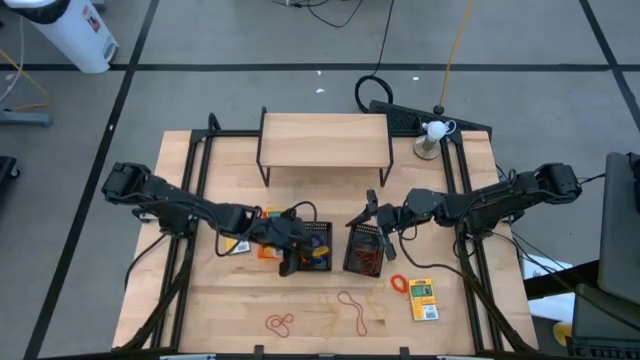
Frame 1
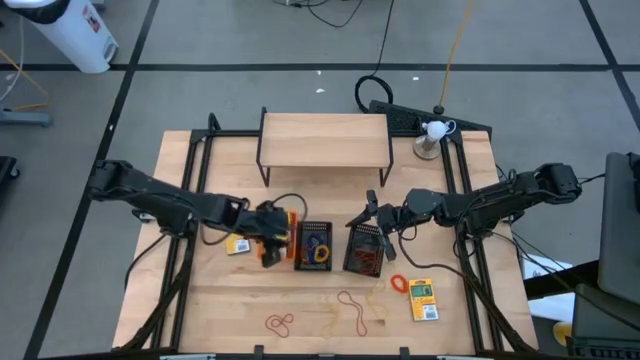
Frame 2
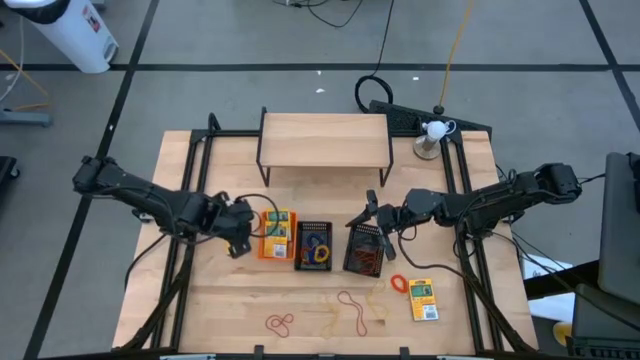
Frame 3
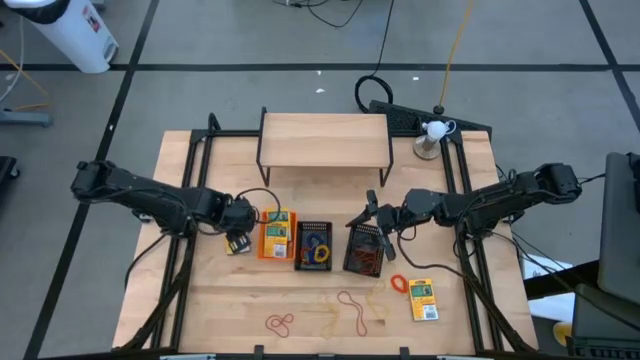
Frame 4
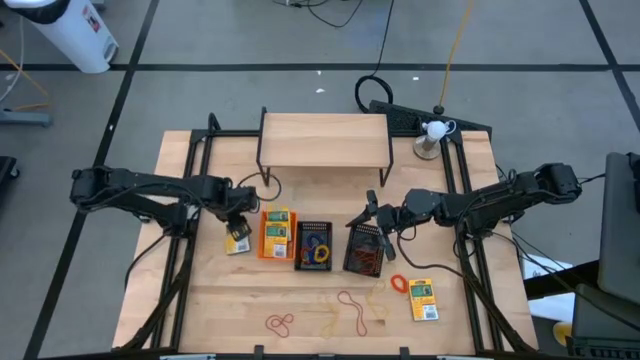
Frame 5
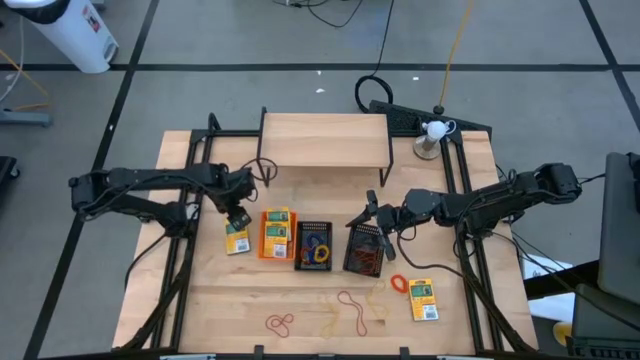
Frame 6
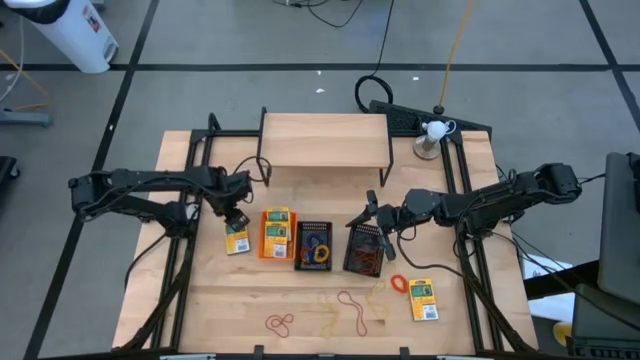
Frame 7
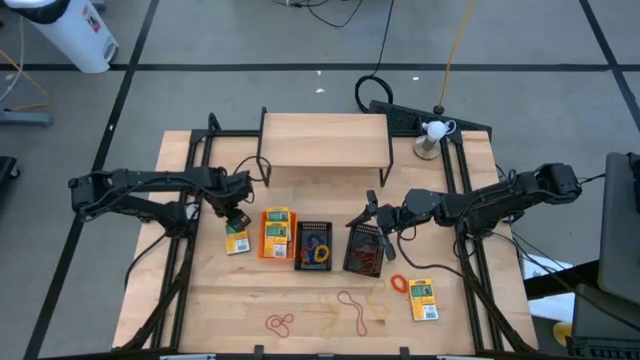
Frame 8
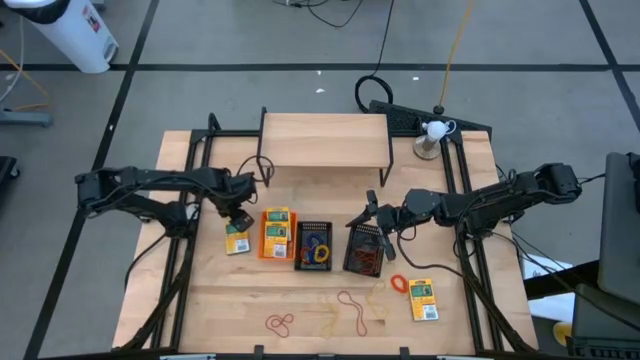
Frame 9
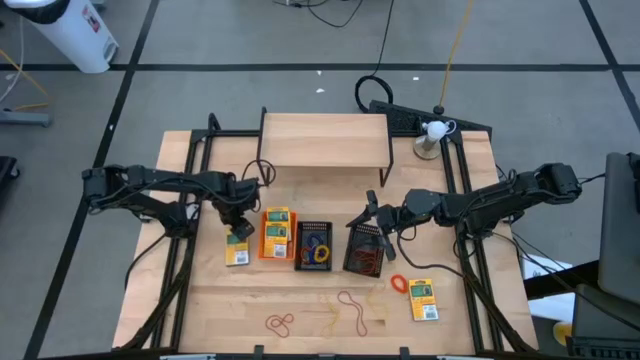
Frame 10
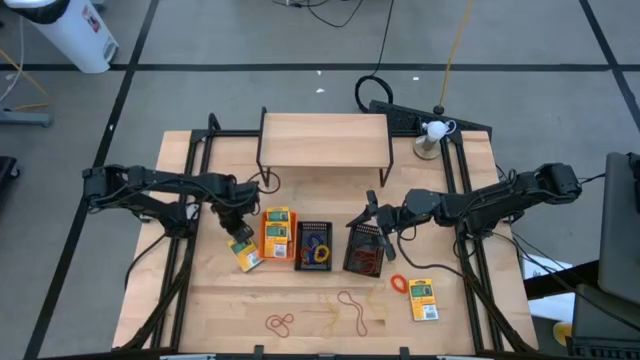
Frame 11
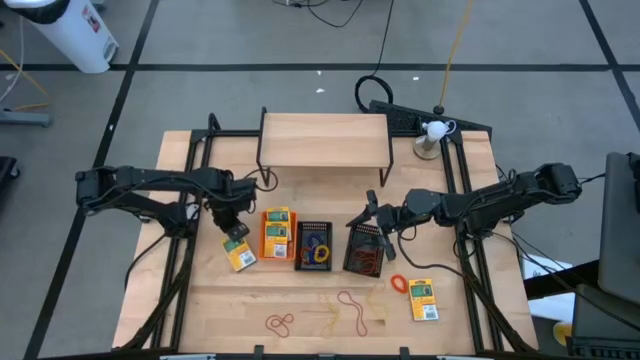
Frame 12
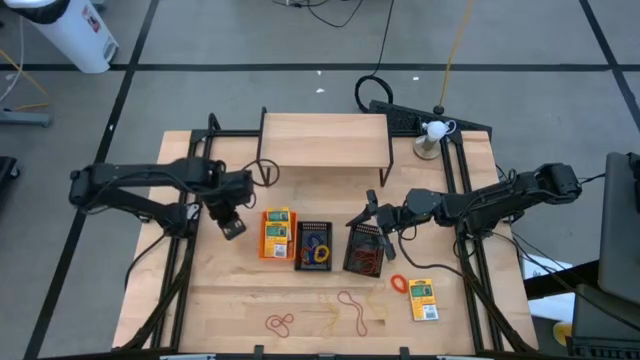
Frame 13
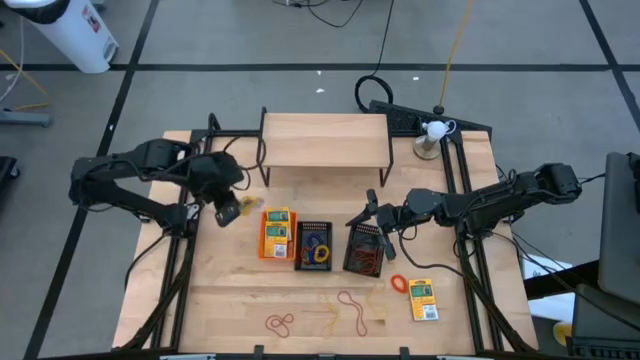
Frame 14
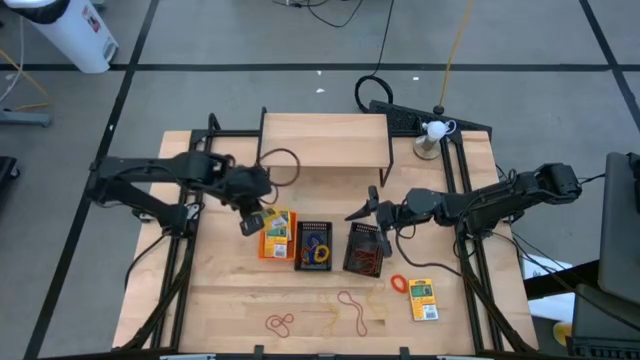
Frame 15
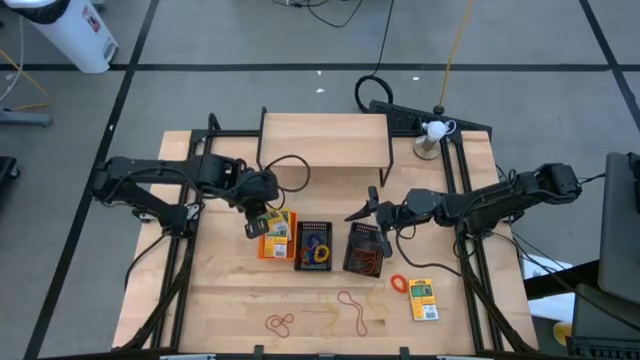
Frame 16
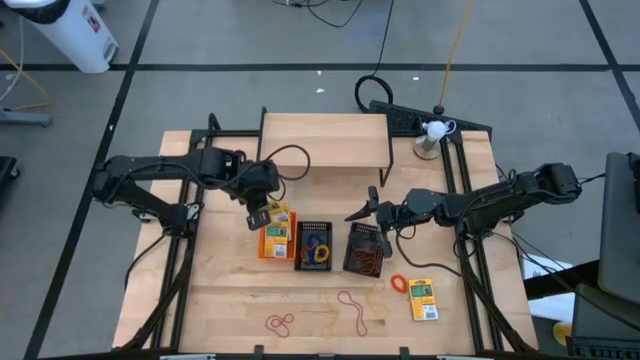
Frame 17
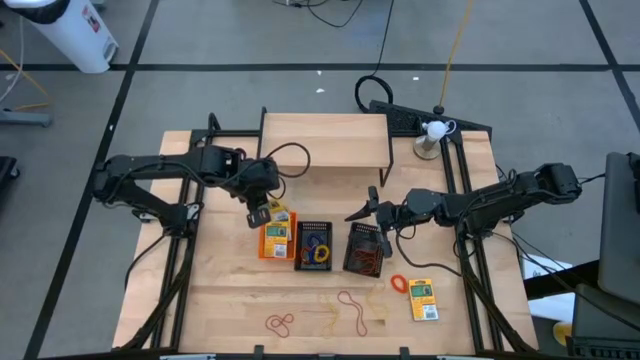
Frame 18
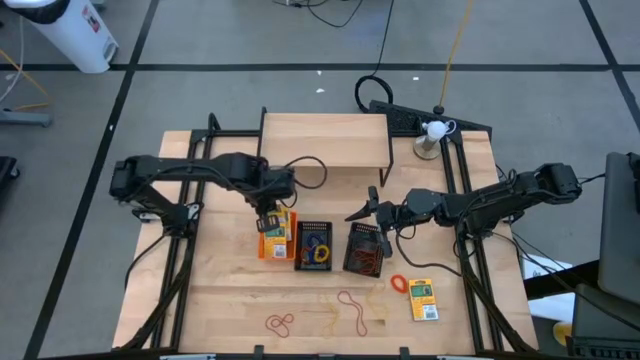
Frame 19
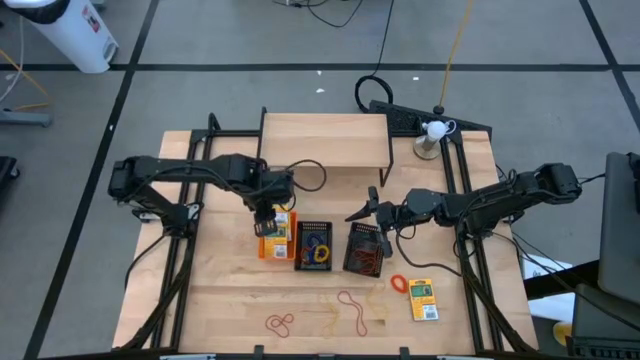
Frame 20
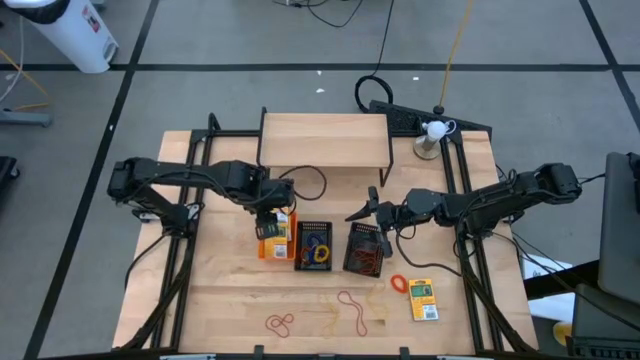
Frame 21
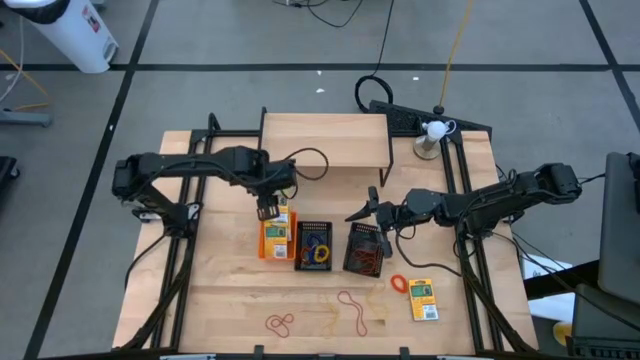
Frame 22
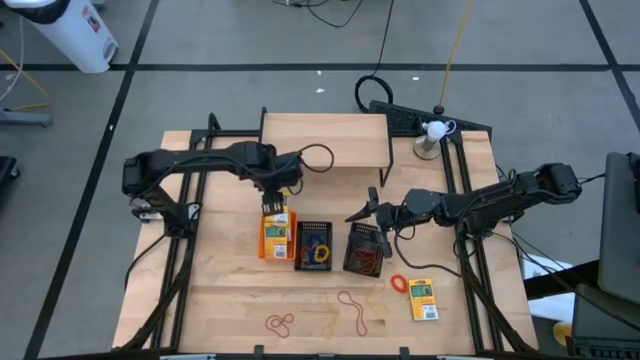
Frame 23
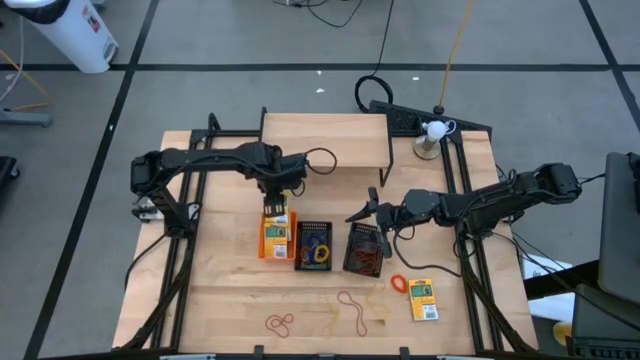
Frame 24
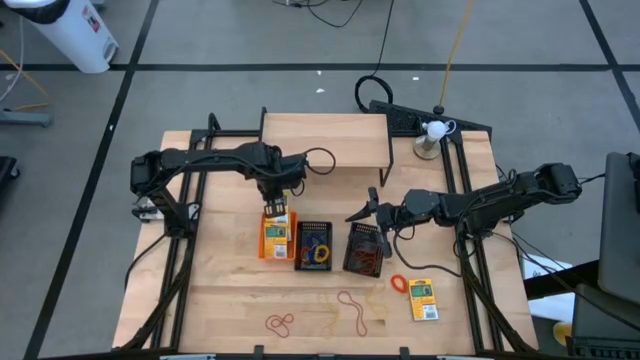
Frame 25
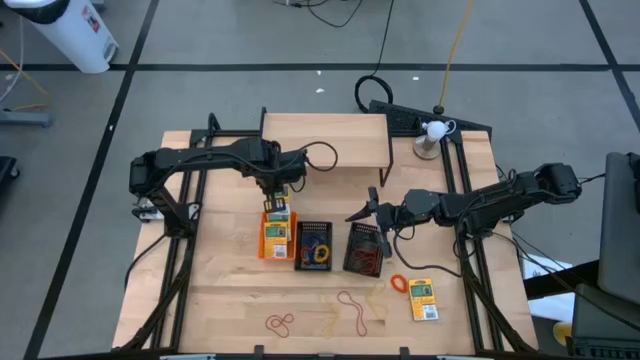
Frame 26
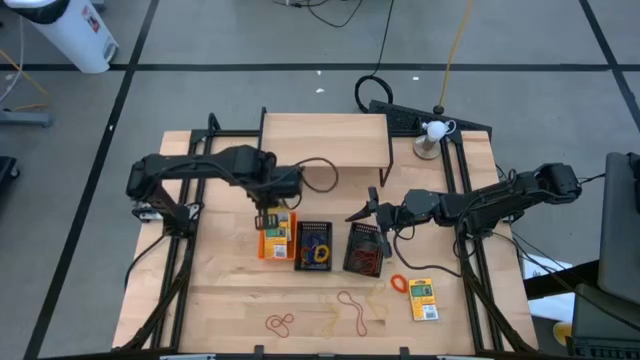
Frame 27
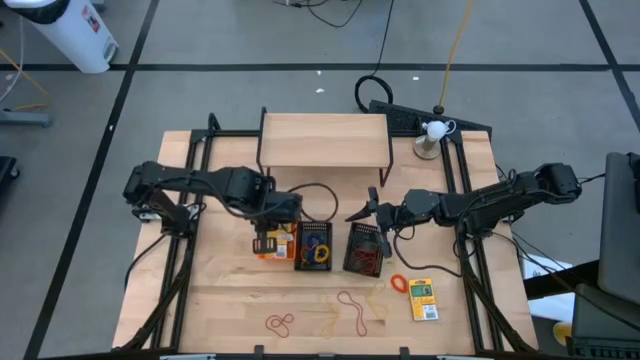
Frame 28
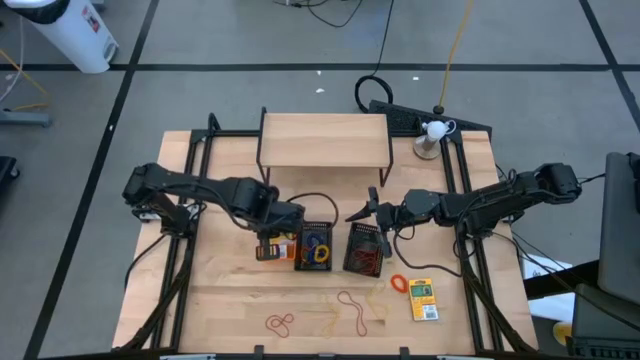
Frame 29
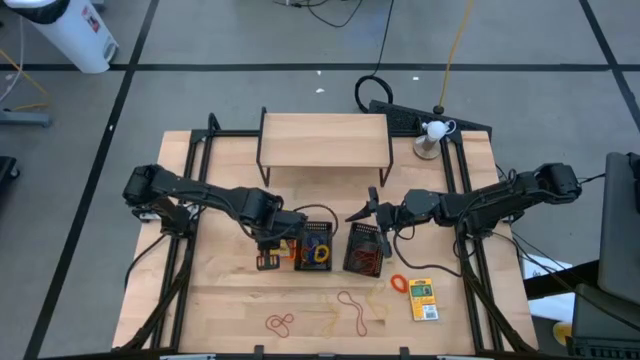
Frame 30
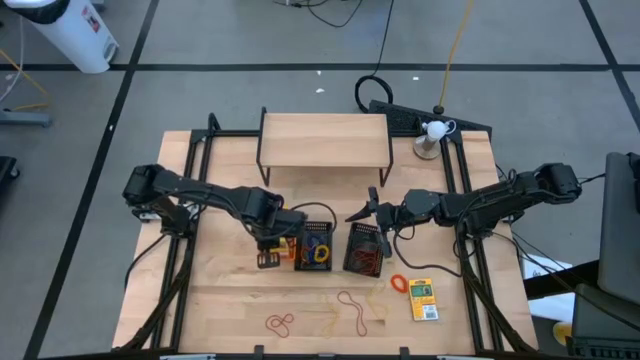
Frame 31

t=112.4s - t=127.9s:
Task: Pick & Place Office Desk Supplies
Put the crayons box into the orange bin

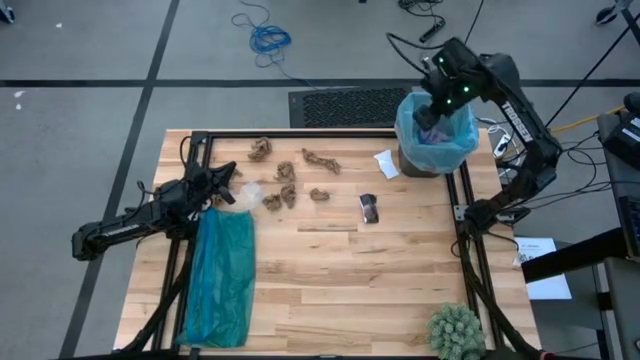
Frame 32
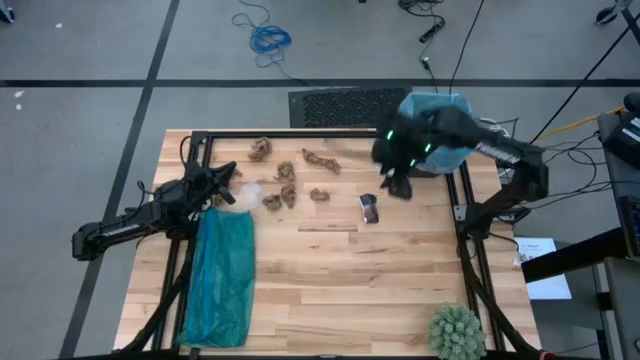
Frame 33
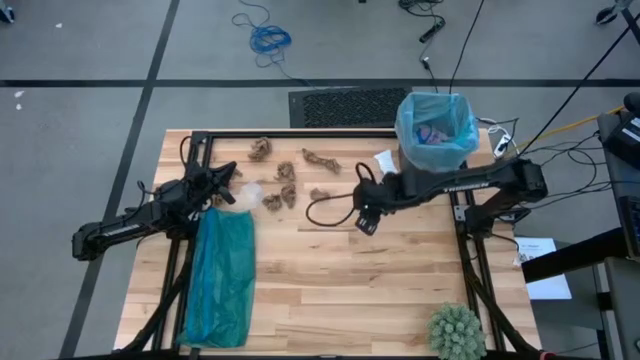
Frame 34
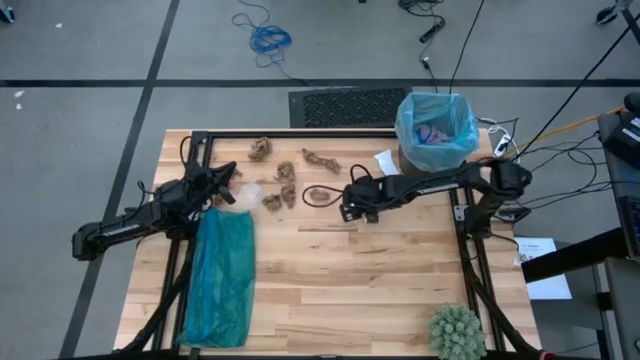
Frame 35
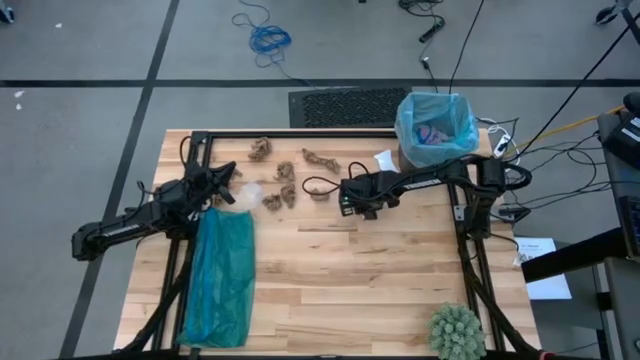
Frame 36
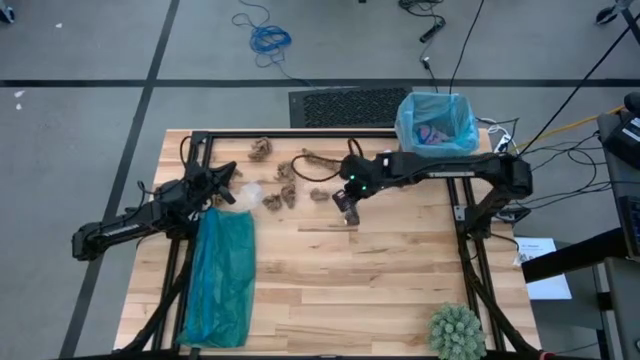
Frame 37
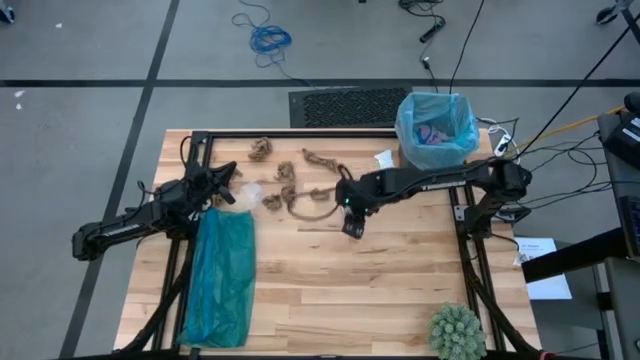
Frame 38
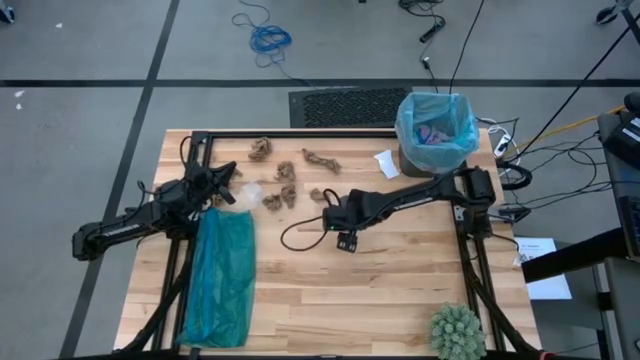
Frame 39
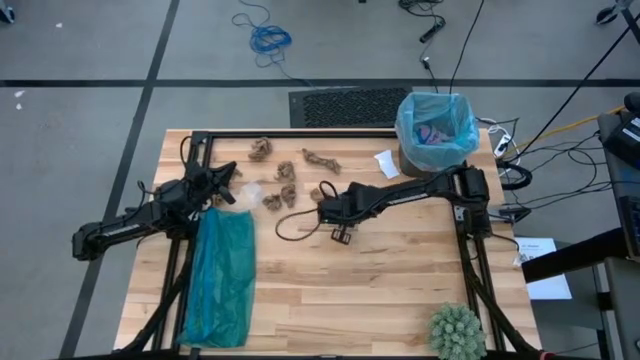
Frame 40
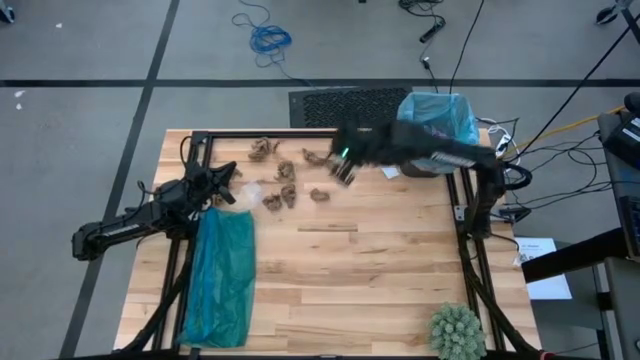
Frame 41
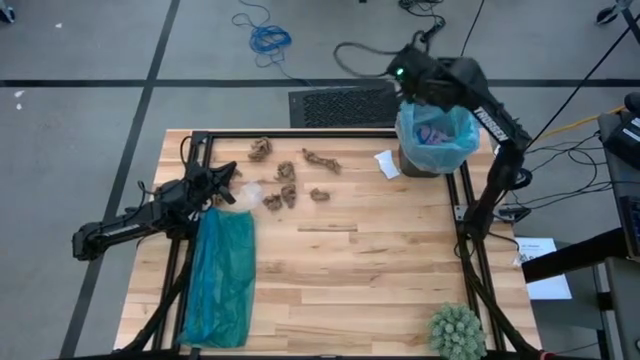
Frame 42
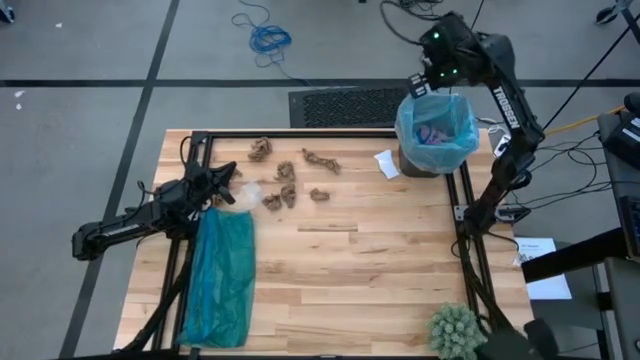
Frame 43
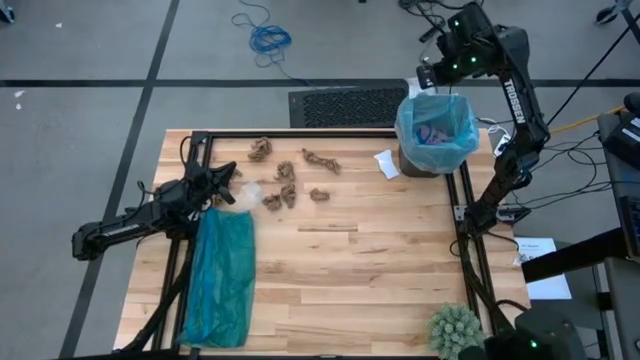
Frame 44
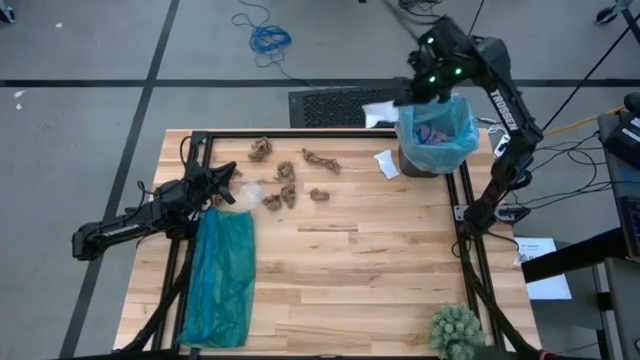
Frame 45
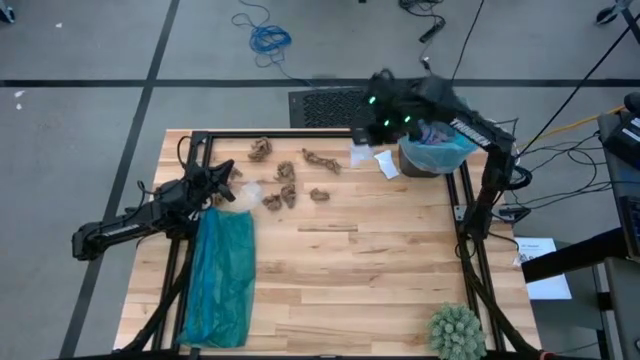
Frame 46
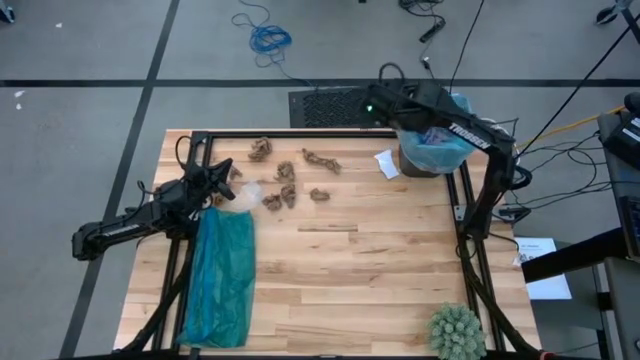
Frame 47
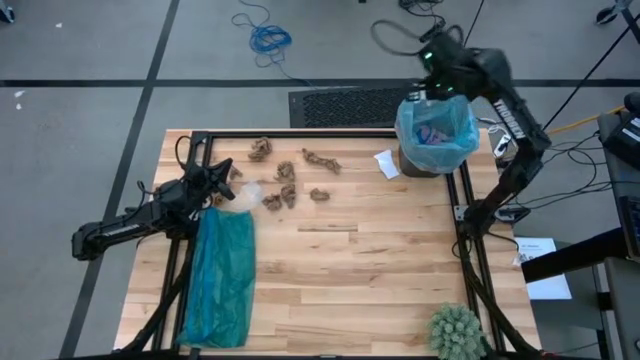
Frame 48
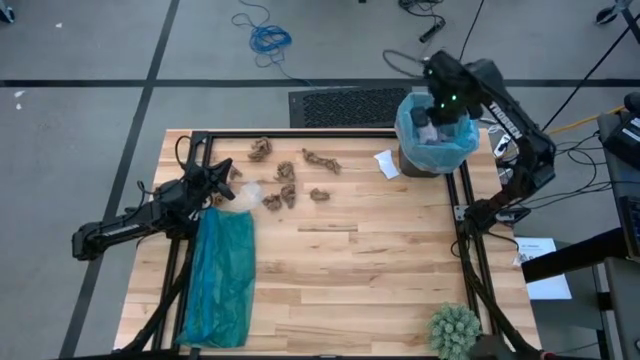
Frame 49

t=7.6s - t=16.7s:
Task: place trash/remove bag and relplace
Put the black paper into the trash bin
